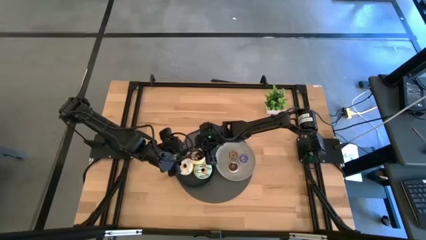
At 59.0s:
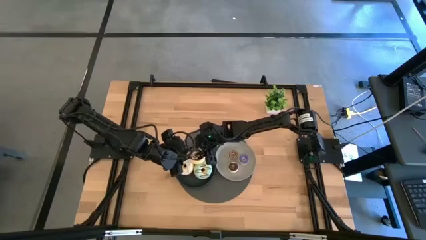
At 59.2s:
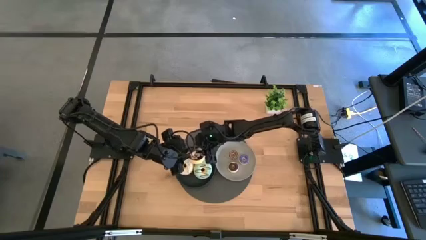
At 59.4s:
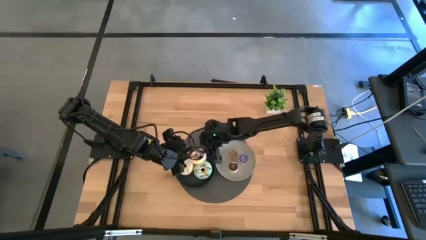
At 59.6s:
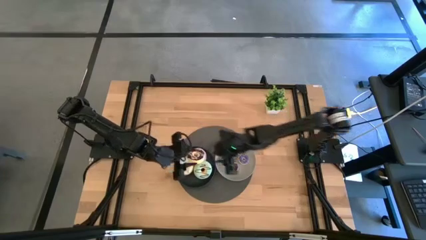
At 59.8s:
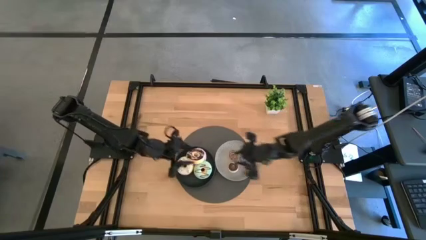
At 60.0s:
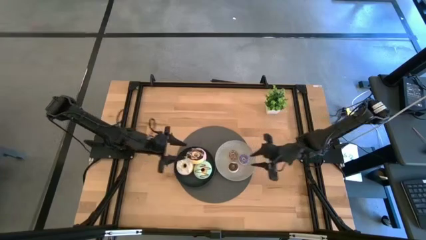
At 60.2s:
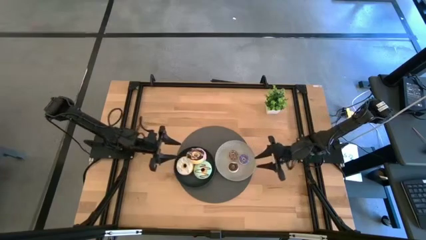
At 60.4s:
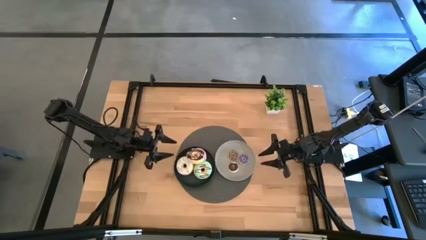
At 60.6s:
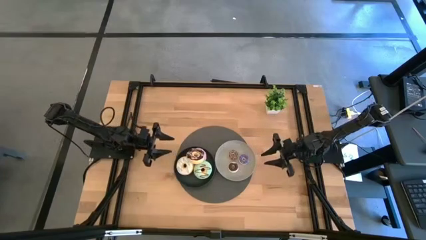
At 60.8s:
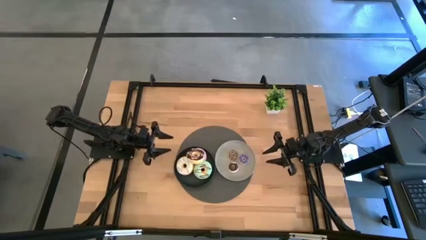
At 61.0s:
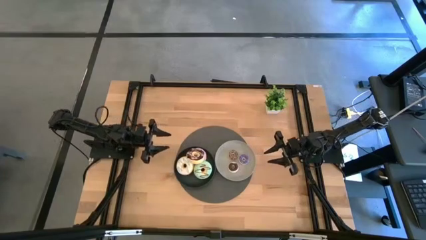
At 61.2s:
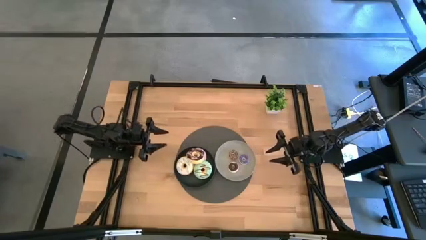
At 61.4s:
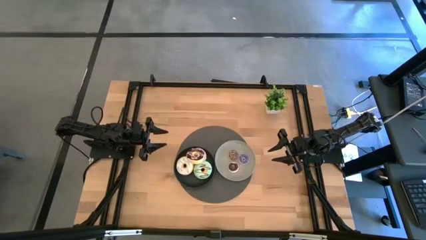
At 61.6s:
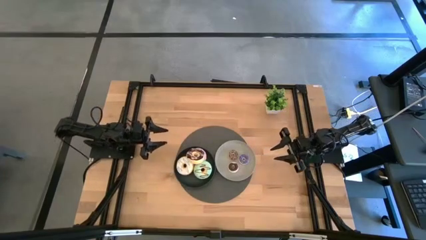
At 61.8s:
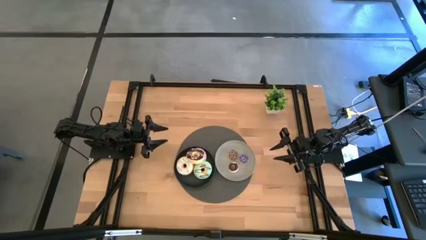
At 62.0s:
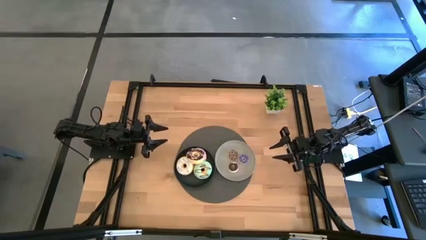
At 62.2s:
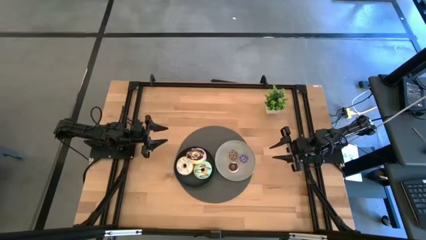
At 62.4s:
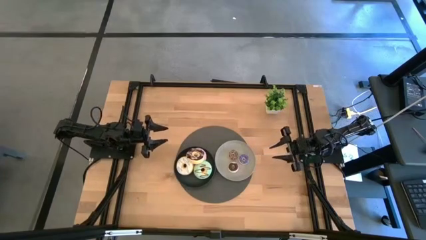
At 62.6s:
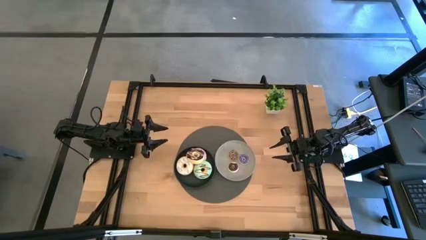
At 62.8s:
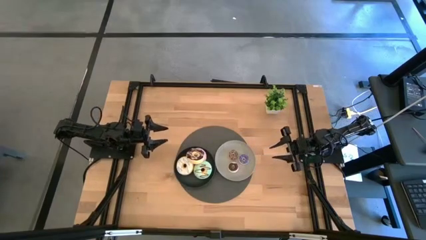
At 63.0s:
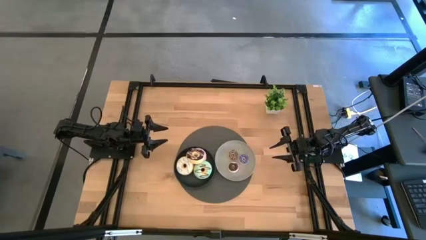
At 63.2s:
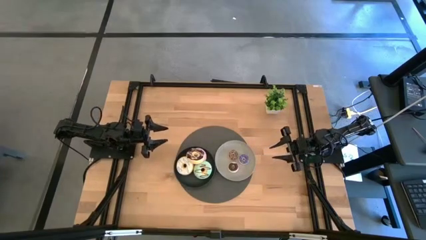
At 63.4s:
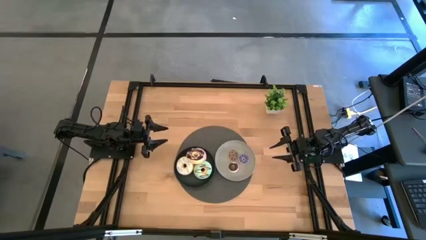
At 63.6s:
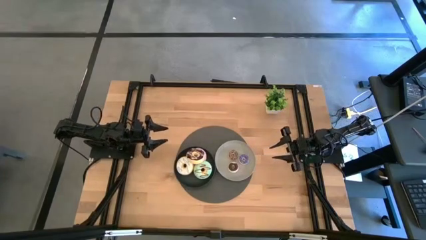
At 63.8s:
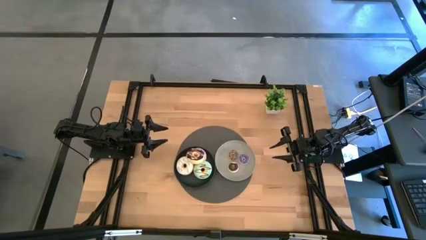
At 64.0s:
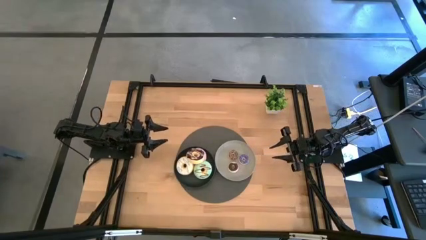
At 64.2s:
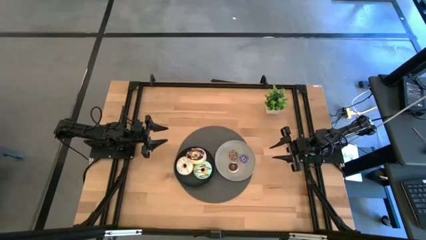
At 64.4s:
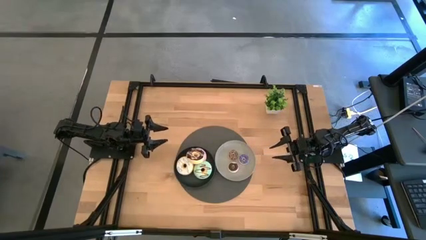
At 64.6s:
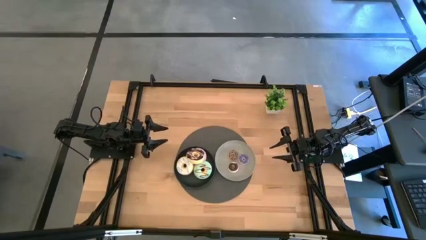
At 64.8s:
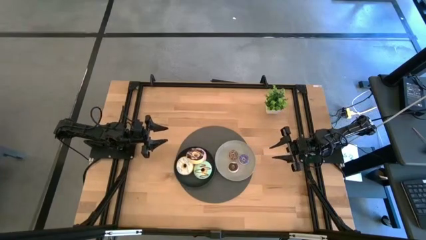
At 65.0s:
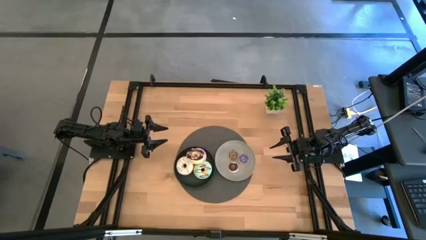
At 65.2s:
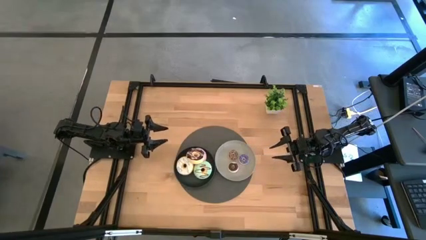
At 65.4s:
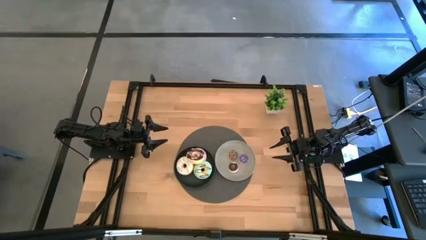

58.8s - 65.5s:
Task: Pick & Place donuts
Return to Home Position

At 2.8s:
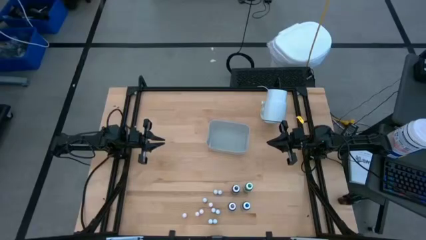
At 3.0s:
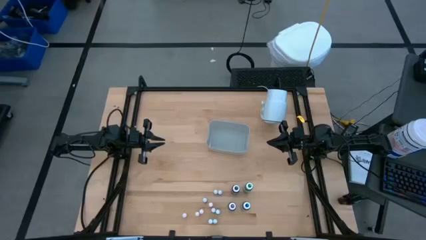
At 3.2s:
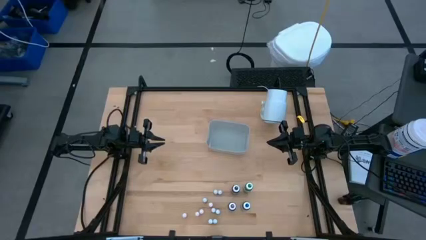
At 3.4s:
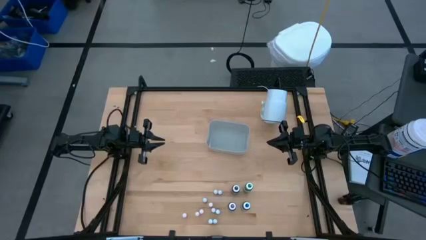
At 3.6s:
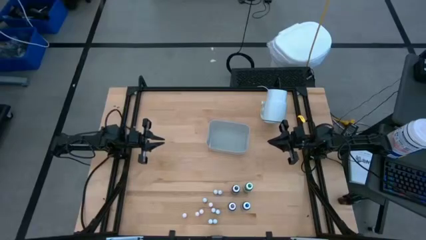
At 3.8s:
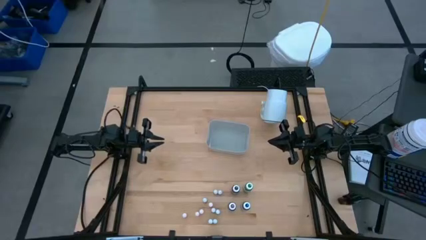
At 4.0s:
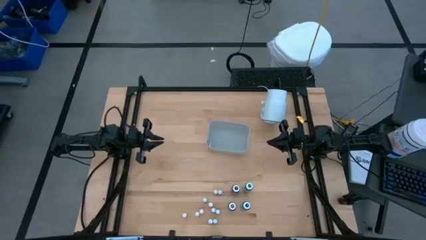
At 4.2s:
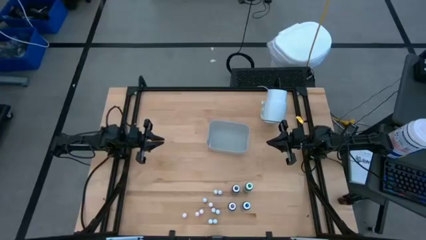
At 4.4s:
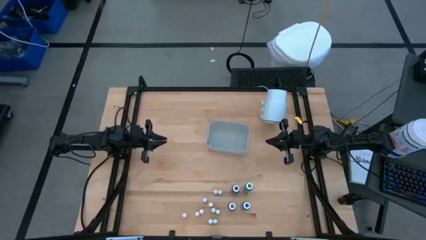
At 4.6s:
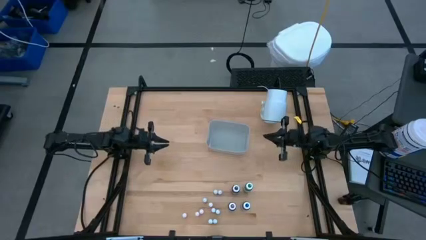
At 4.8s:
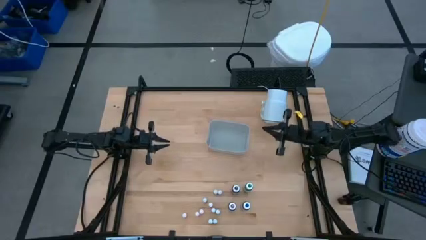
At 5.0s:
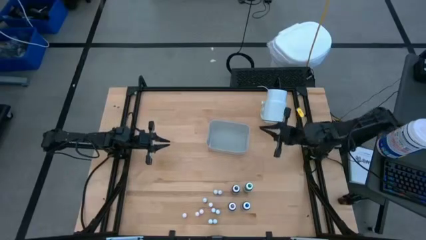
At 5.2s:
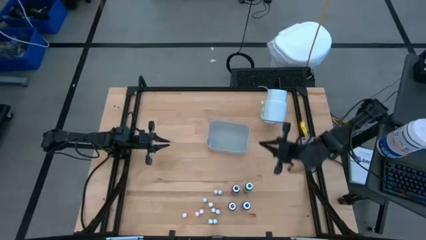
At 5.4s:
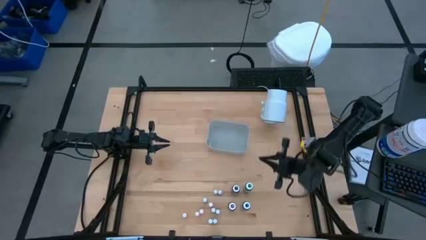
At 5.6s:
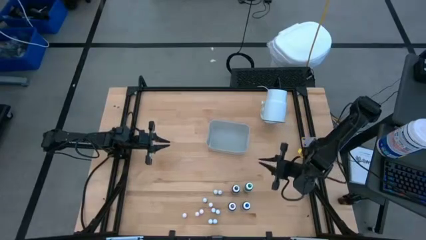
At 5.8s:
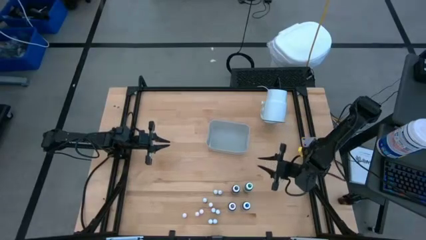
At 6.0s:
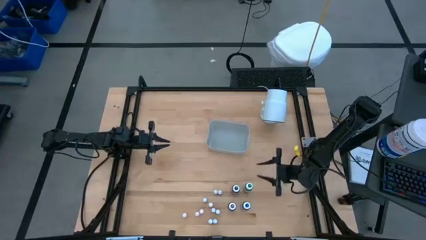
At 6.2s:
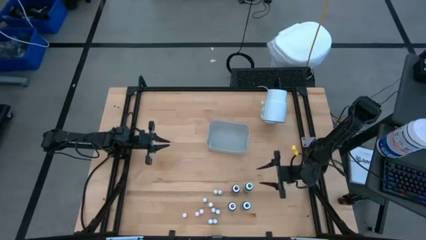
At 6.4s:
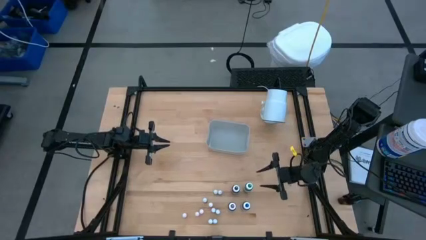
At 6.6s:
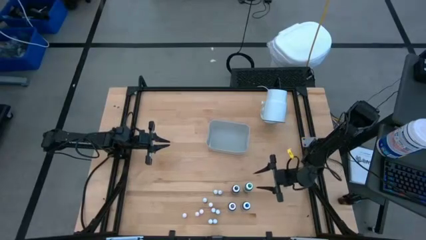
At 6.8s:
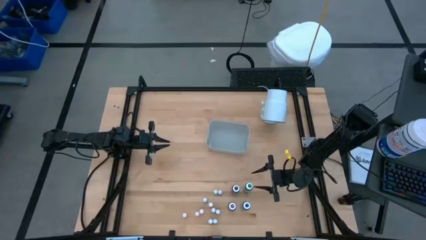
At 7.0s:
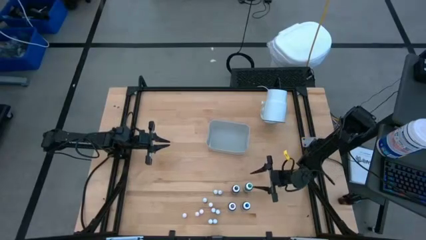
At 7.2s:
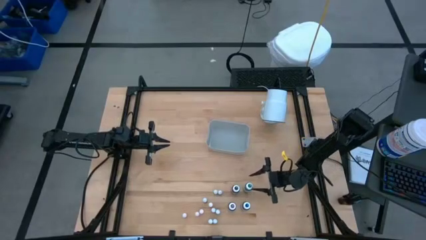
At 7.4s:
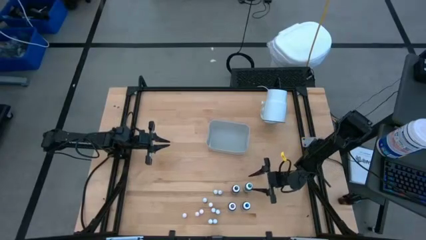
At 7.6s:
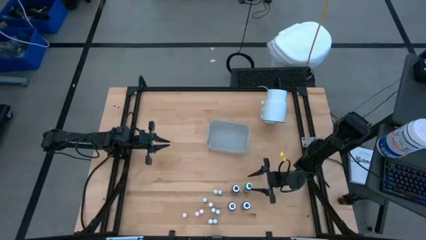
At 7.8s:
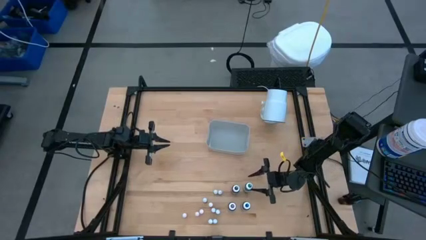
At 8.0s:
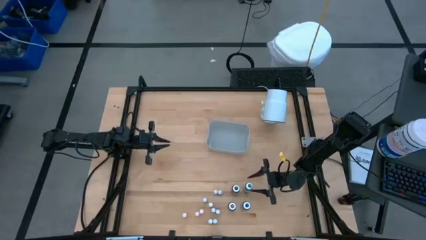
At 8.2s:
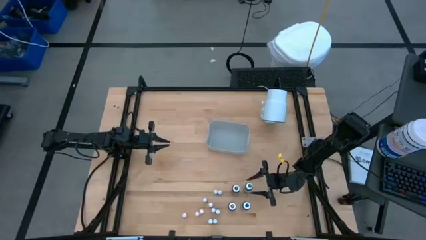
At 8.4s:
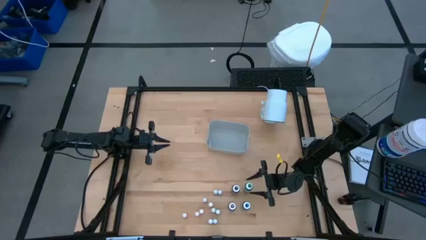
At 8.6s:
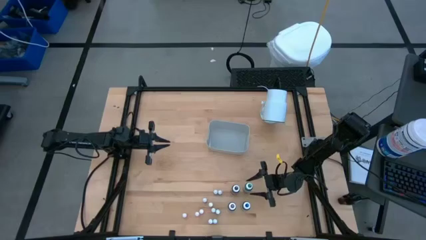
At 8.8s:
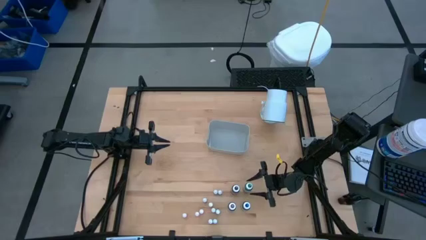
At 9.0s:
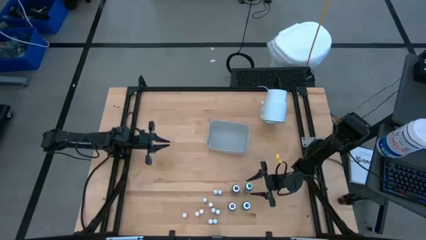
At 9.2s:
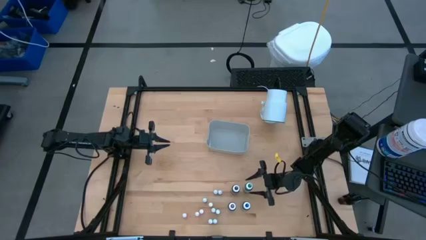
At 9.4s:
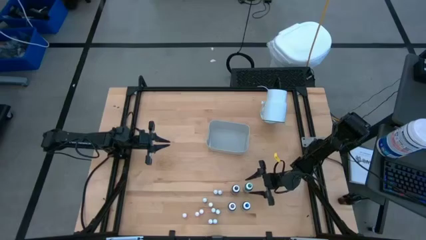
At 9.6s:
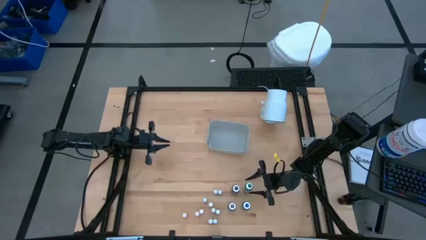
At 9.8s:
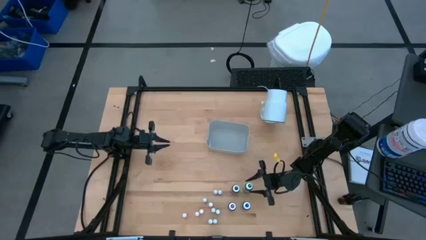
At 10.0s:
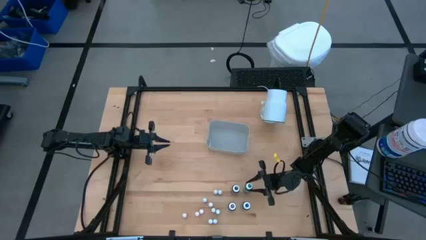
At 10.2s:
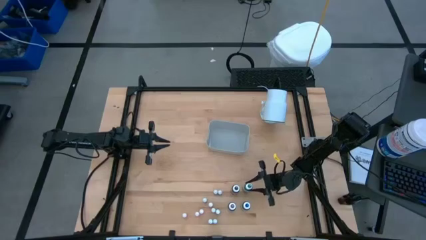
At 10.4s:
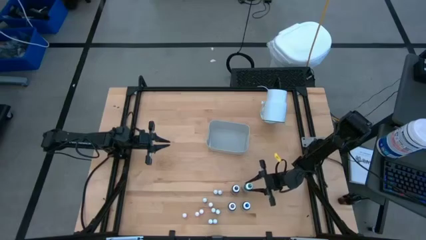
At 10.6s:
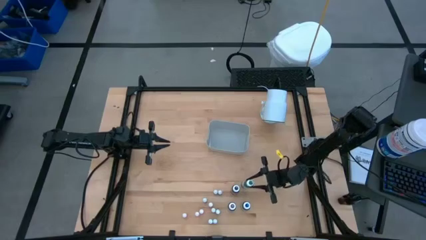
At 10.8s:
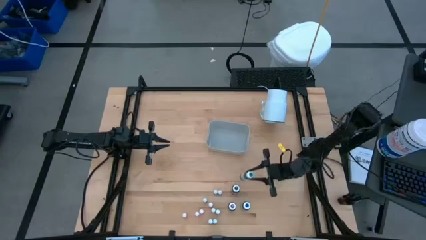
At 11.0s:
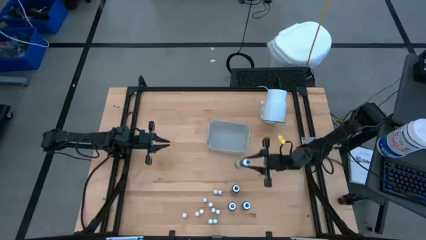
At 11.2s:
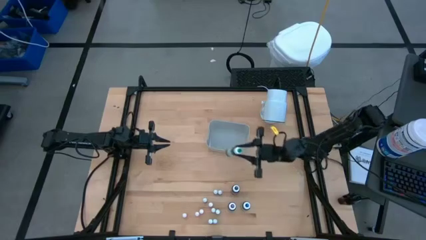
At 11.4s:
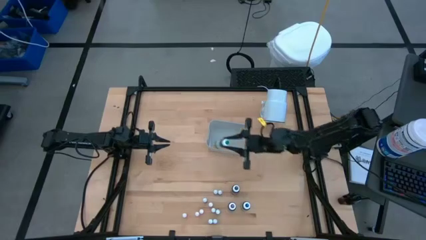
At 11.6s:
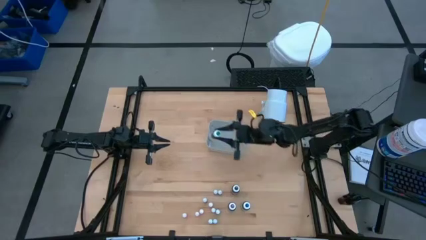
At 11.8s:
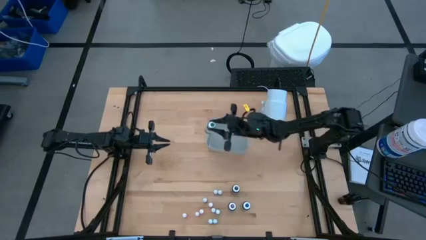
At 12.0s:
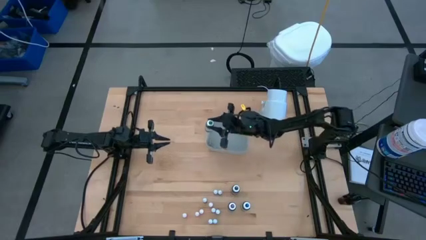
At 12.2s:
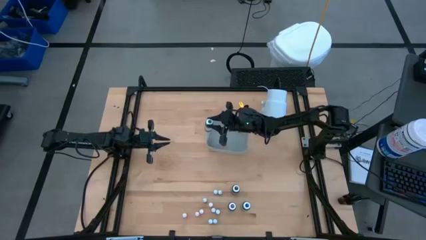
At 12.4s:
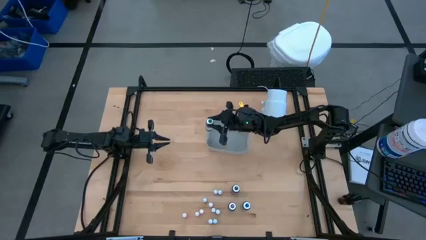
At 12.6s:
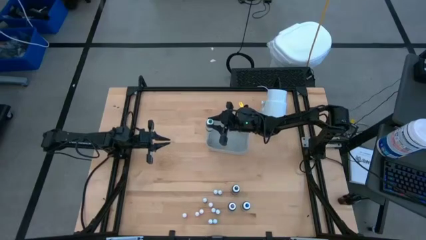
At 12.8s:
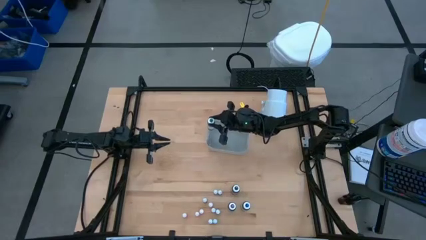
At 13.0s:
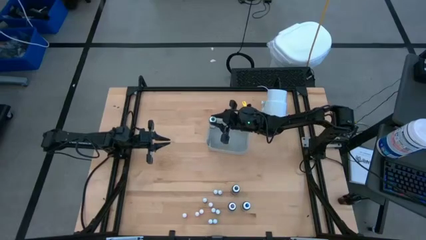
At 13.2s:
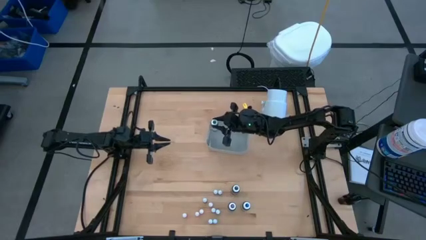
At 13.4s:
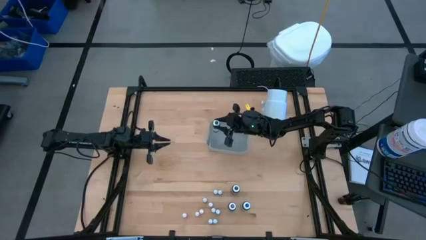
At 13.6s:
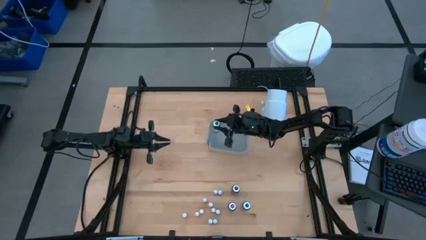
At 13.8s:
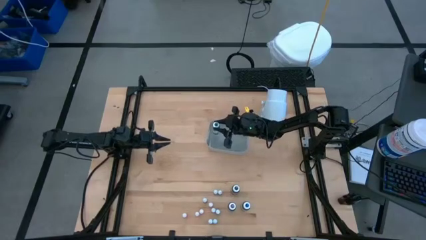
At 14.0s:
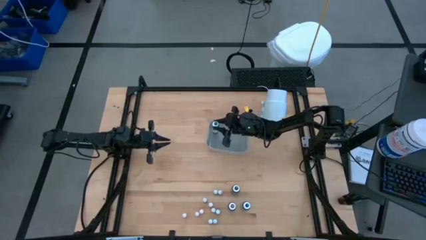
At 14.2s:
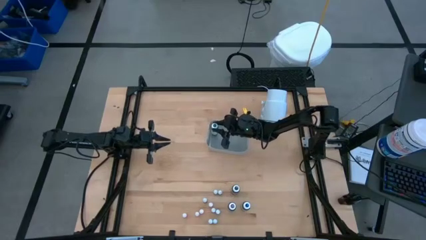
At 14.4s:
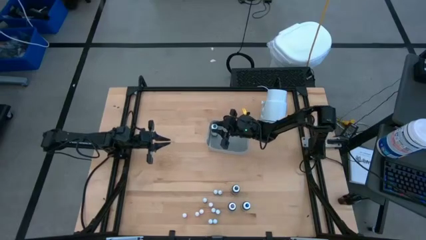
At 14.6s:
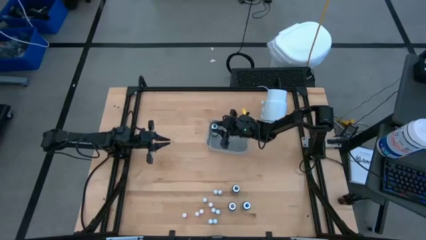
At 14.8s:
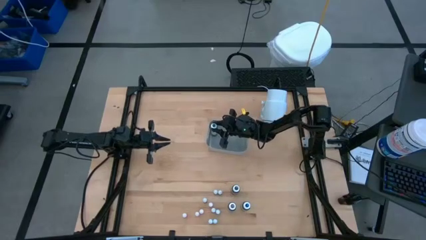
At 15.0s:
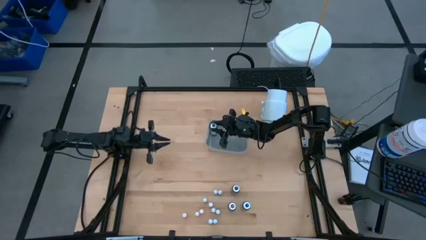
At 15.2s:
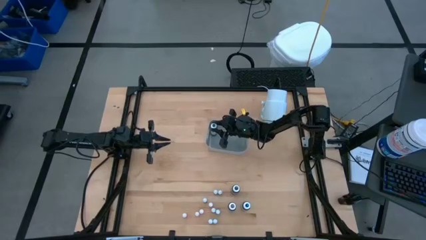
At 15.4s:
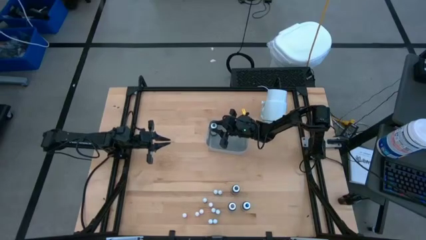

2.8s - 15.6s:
Task: Pick & Place food coloring
Put the large green food coloring bottle into the gray bin
